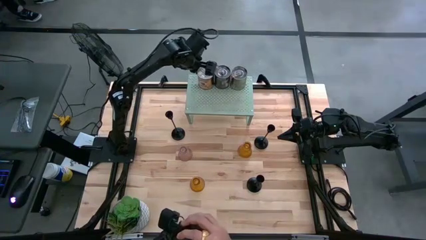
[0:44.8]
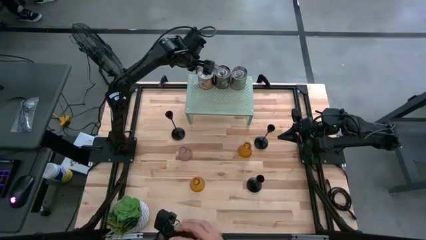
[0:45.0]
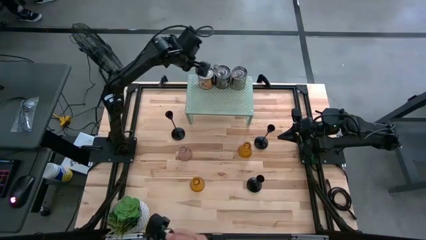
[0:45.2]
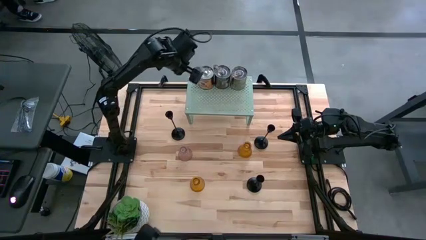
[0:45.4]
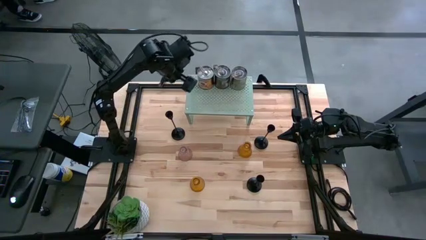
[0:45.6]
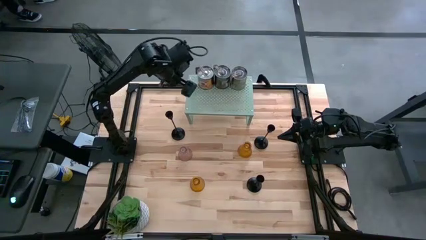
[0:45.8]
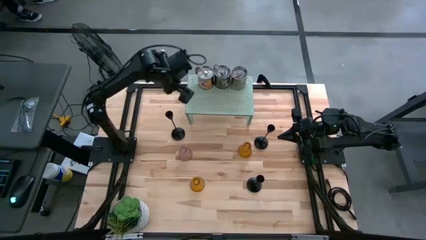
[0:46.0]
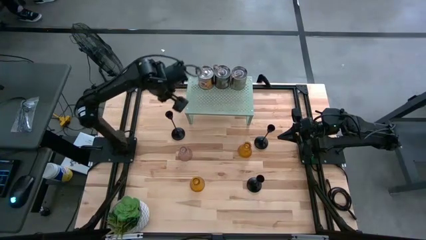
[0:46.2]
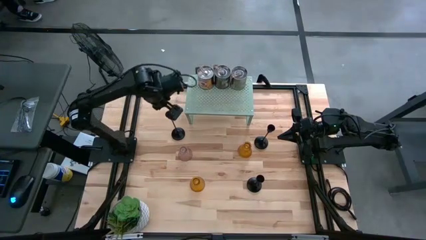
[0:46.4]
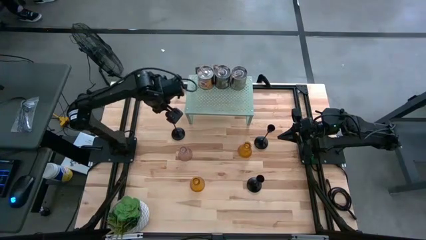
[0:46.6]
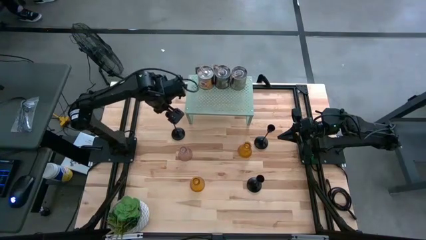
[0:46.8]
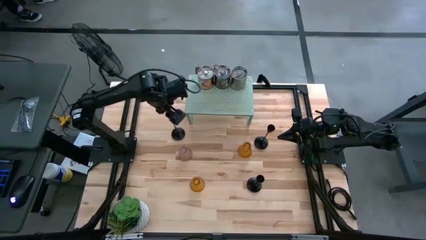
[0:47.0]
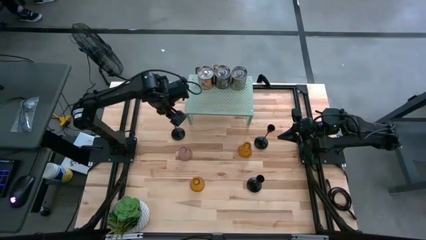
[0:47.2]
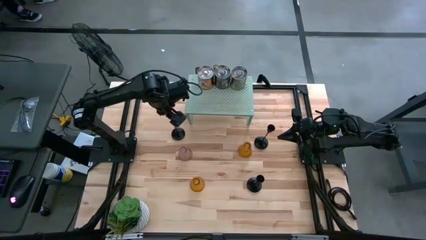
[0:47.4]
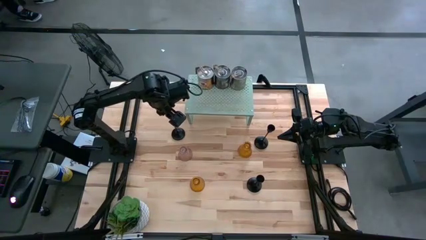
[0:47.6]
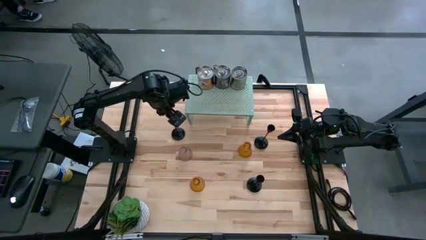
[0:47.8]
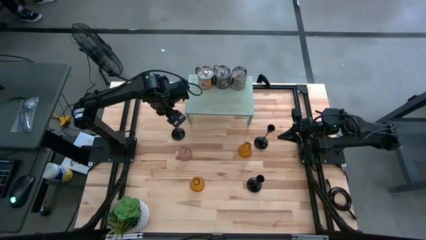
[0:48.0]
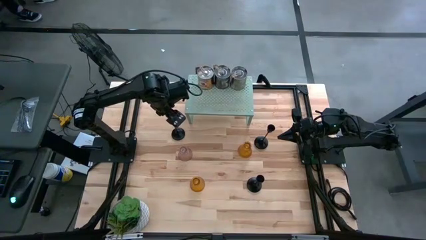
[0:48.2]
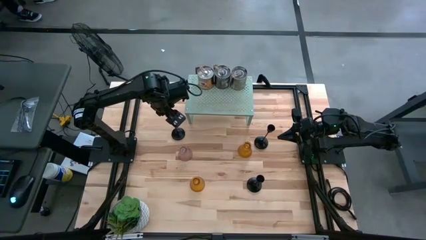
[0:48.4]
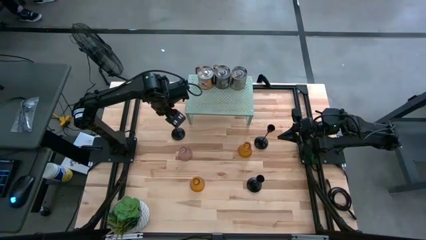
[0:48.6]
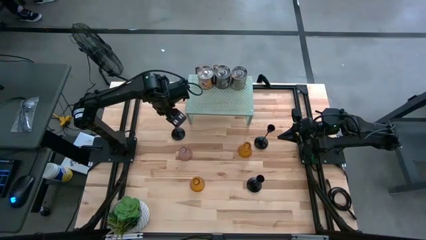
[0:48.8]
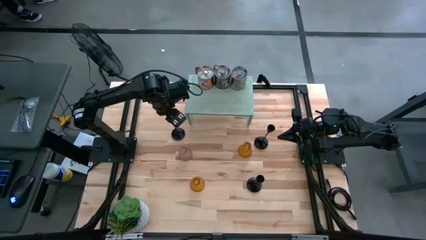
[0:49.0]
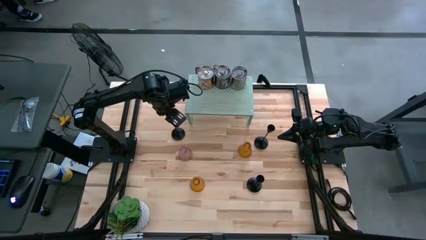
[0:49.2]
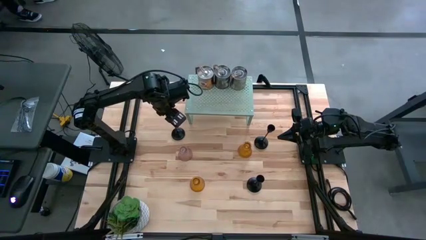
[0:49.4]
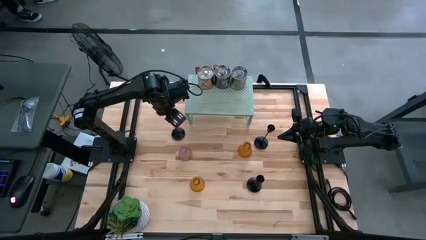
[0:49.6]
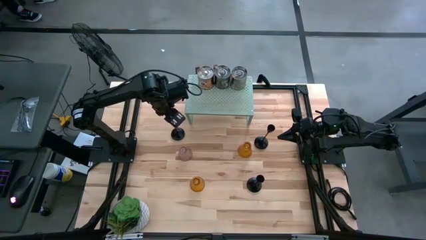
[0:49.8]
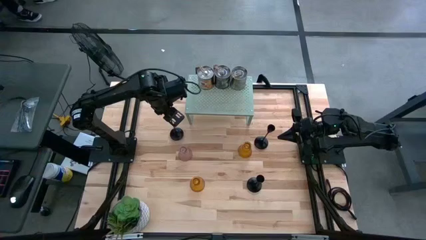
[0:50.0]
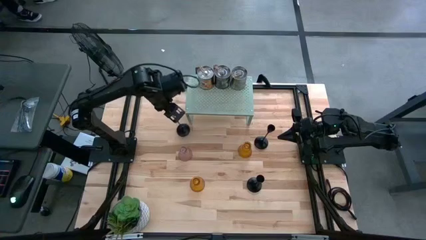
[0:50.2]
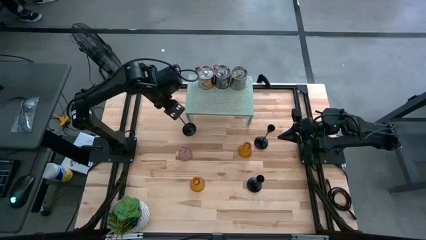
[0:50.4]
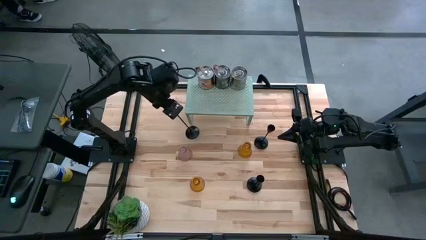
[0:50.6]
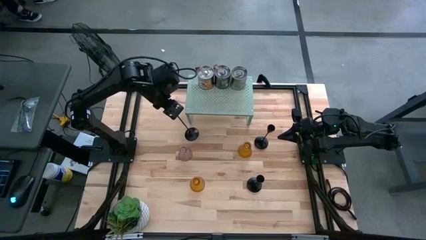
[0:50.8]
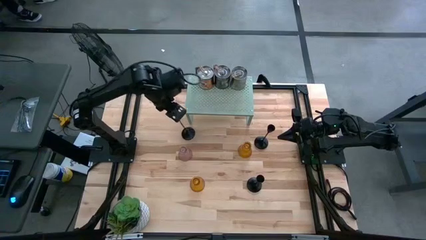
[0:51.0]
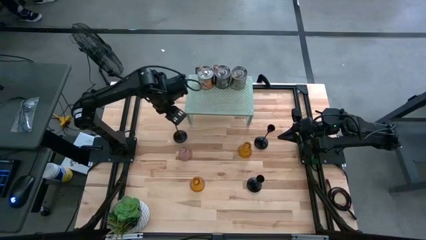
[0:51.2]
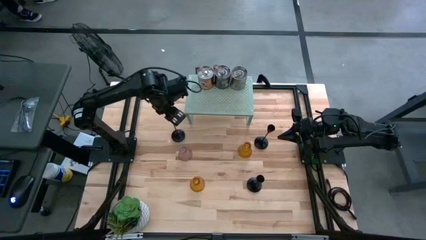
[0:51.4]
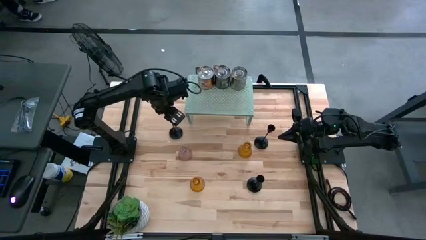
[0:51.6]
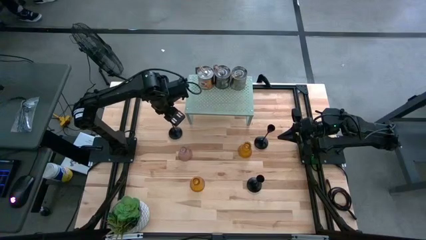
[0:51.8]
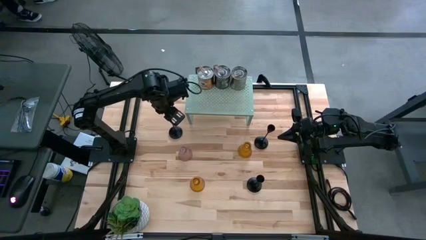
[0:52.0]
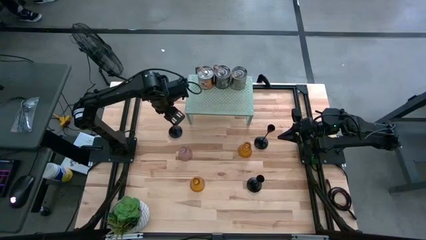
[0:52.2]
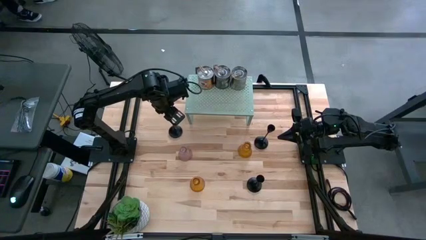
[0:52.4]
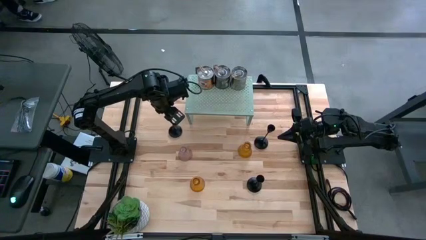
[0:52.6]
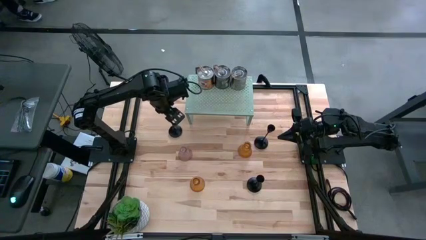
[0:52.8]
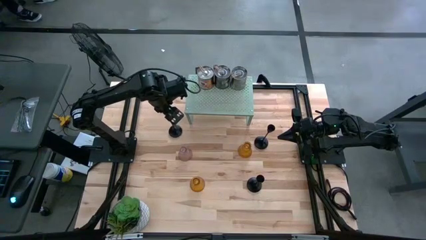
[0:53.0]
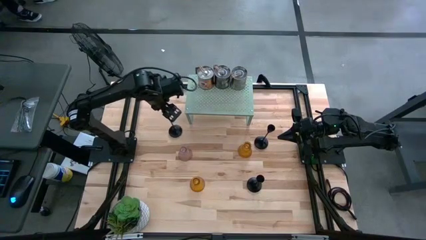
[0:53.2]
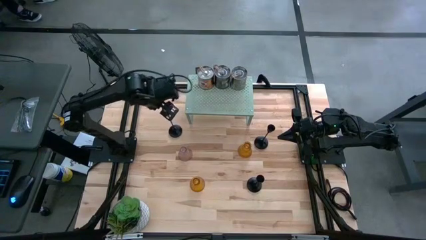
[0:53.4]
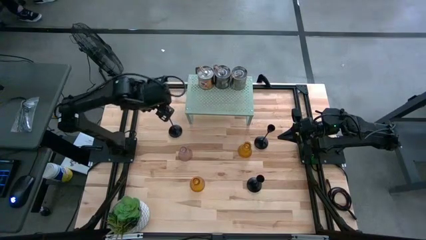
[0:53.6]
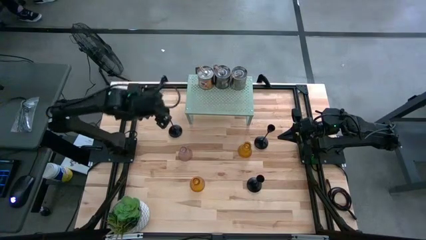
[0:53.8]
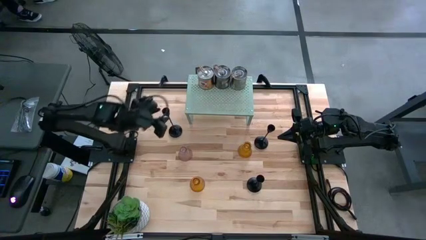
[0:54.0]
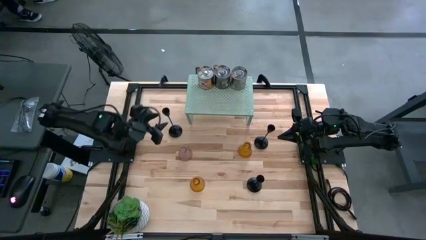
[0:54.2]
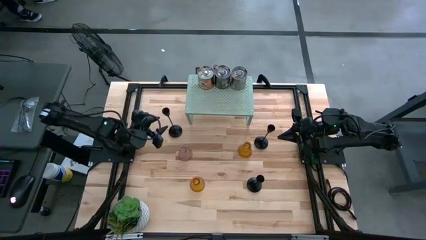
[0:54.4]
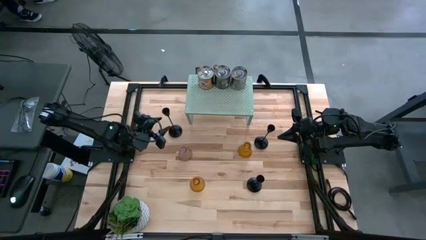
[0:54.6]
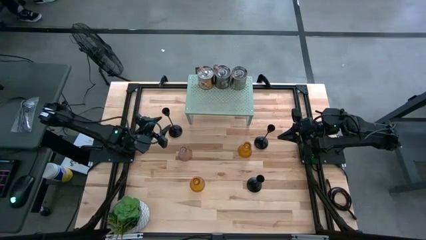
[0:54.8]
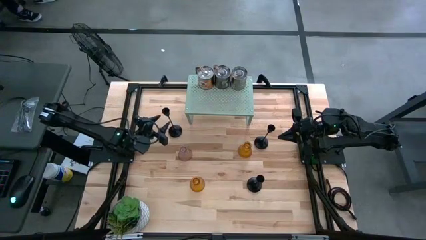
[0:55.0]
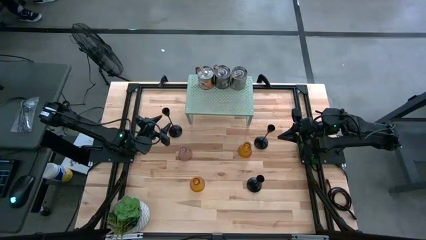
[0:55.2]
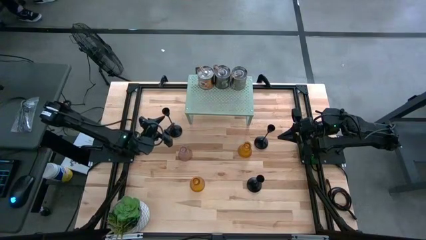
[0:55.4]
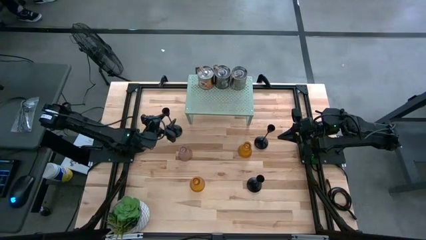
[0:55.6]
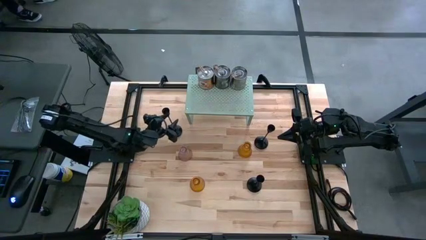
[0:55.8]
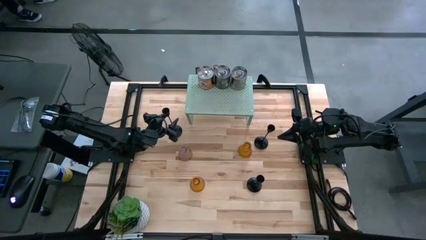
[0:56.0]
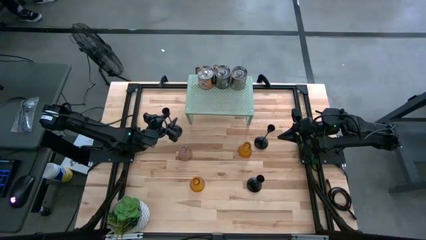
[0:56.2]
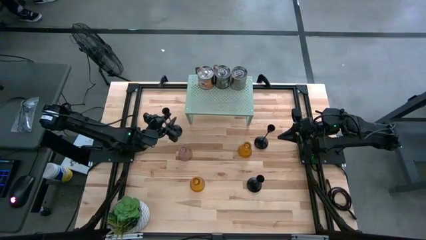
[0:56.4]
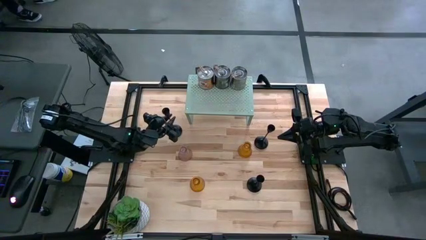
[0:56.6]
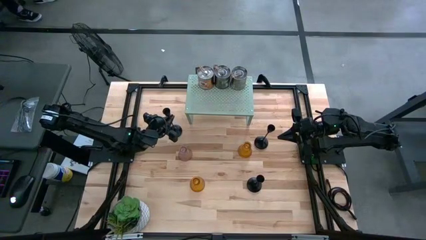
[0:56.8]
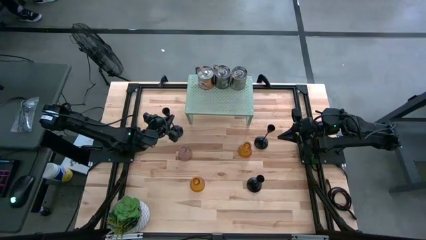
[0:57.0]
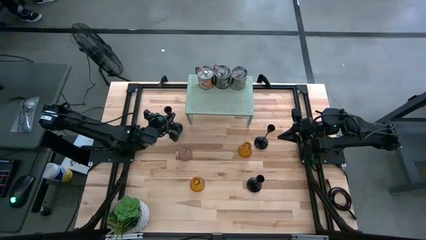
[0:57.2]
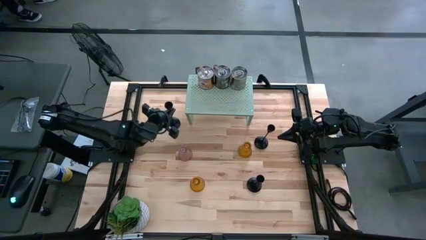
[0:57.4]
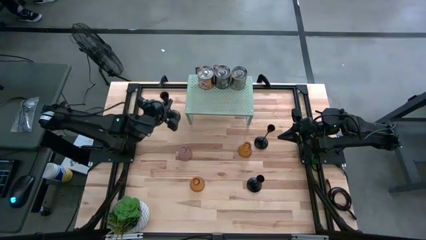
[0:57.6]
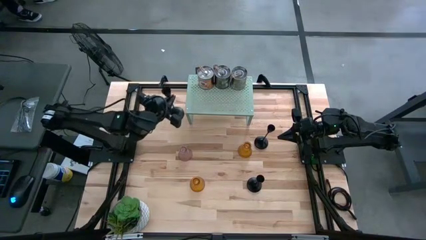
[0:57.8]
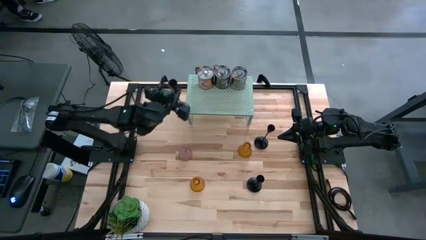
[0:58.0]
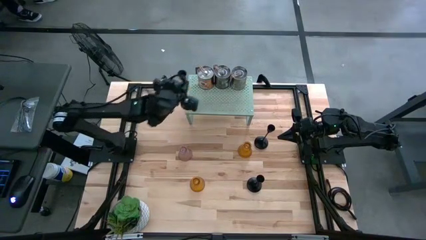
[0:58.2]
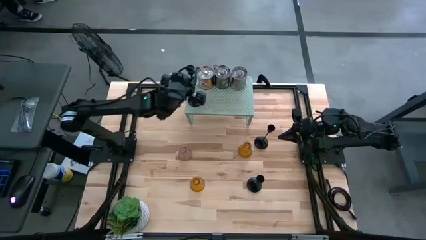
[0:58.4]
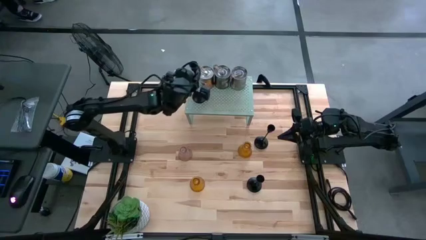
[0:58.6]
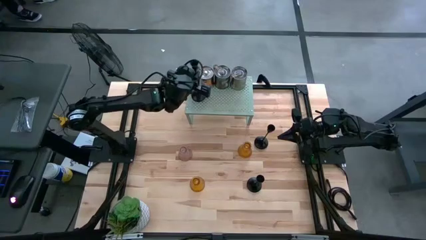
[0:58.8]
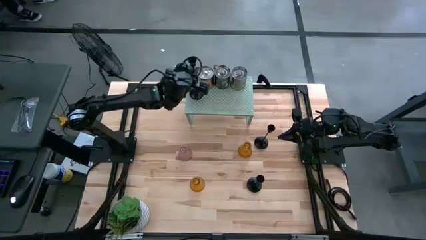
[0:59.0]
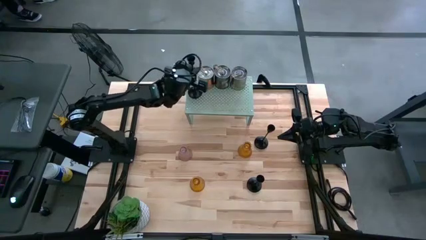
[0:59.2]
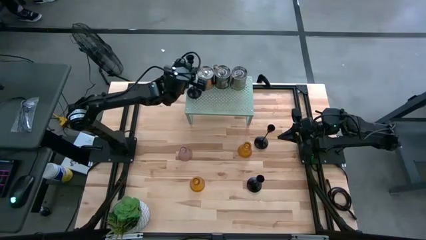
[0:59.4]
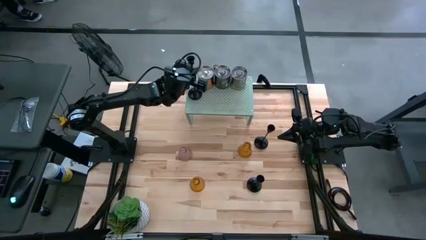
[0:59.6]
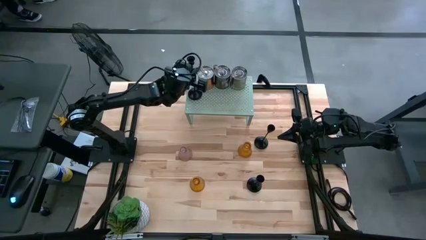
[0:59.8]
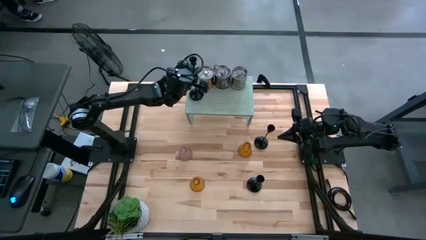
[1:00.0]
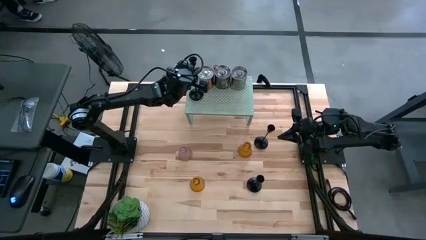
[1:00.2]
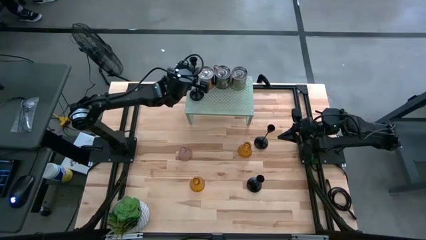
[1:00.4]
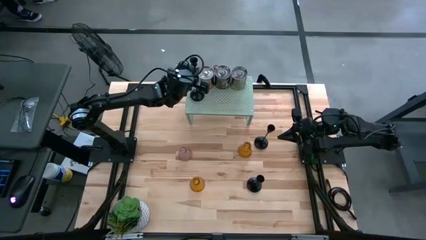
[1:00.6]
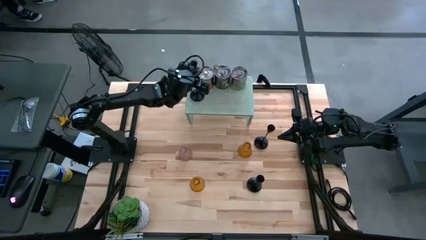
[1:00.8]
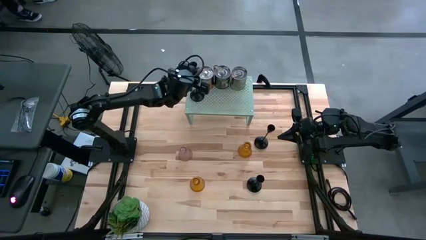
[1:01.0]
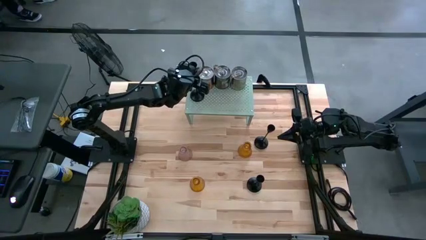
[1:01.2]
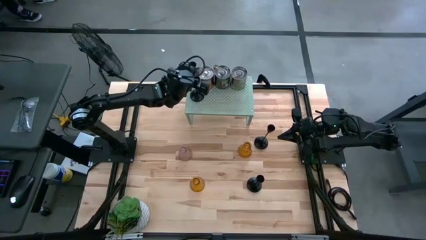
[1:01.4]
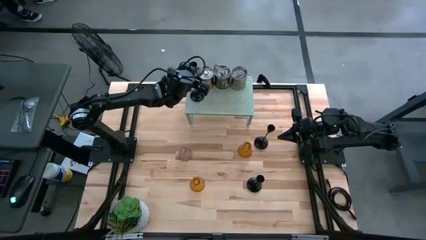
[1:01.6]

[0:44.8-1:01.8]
Task: Pick & Place candle stick holders
Put the top left black candle holder on the shelf
